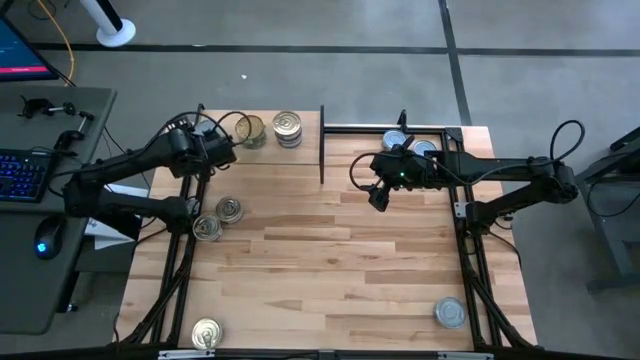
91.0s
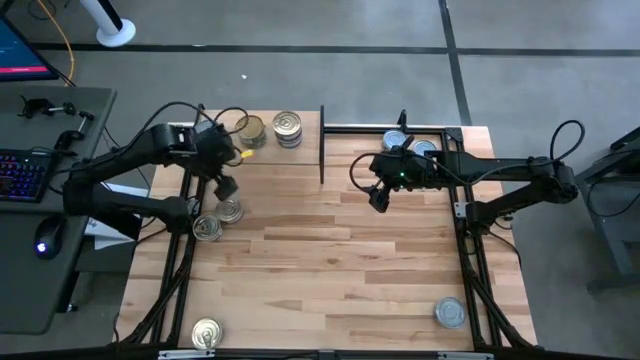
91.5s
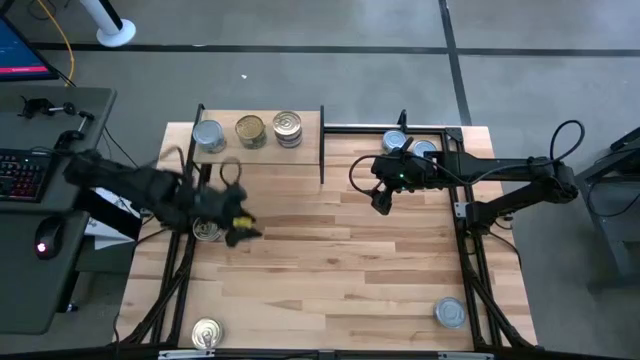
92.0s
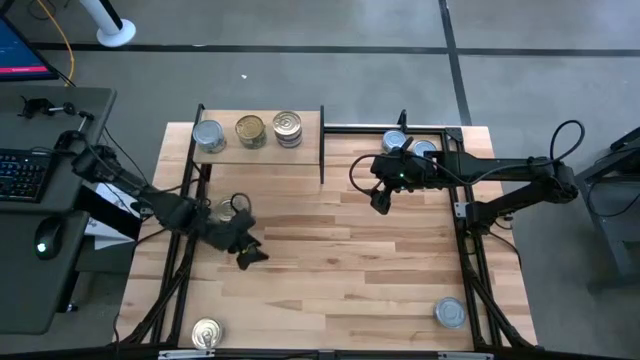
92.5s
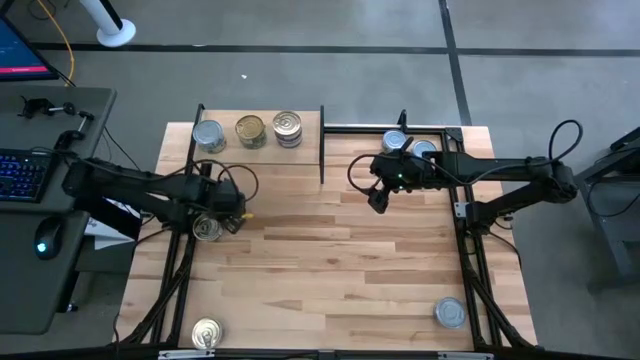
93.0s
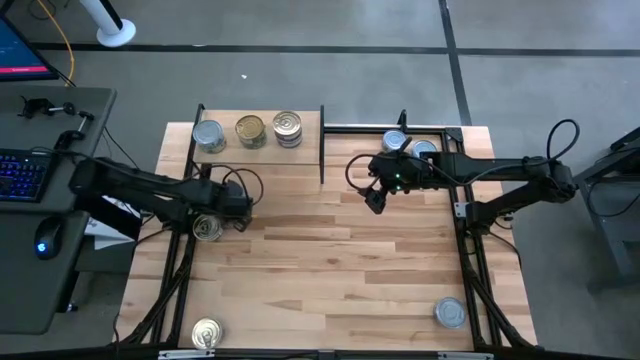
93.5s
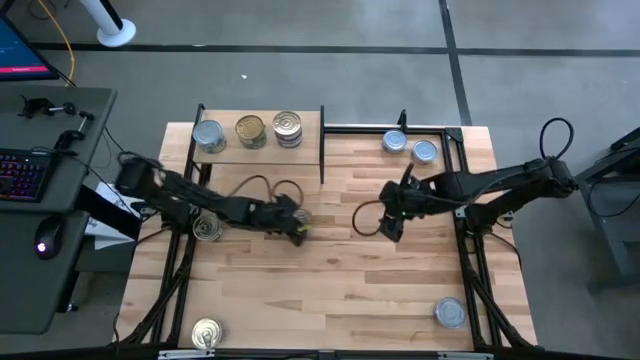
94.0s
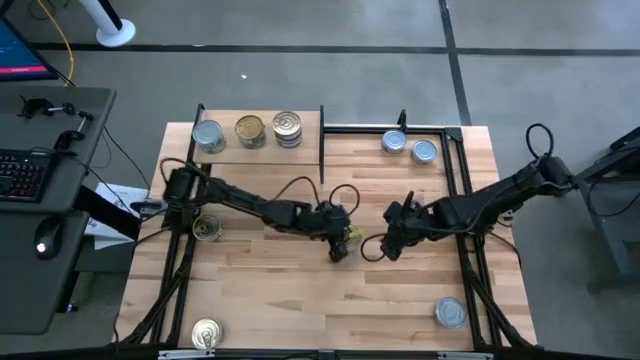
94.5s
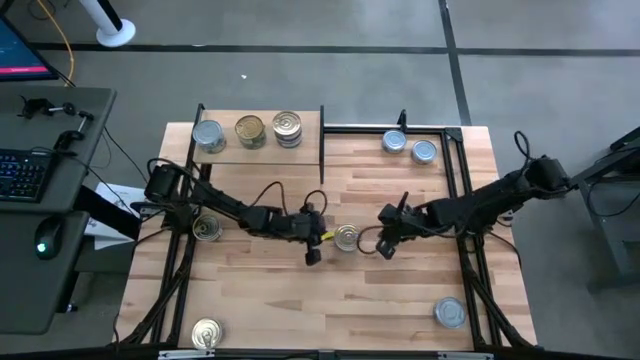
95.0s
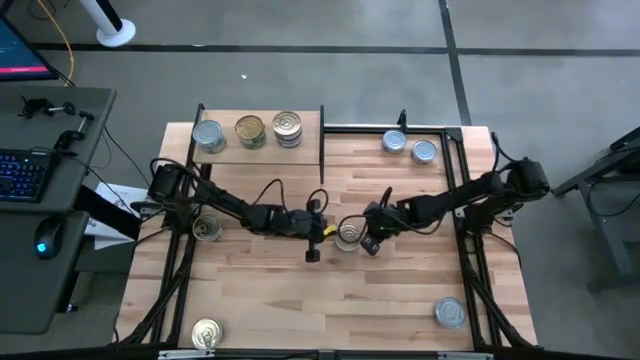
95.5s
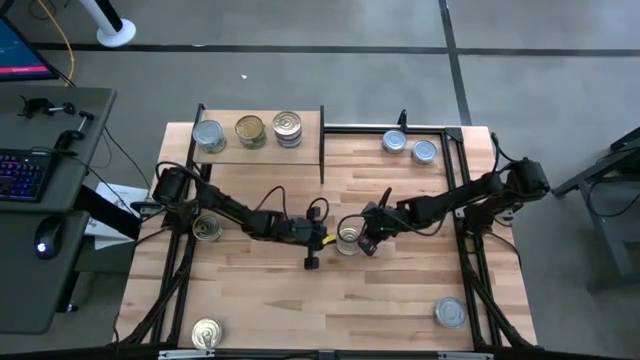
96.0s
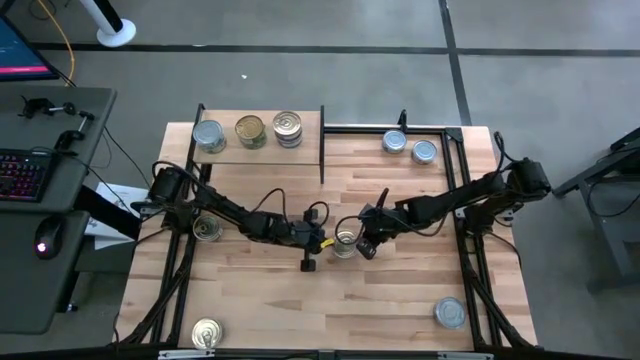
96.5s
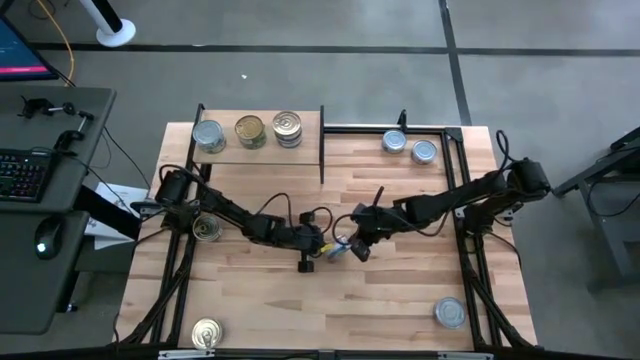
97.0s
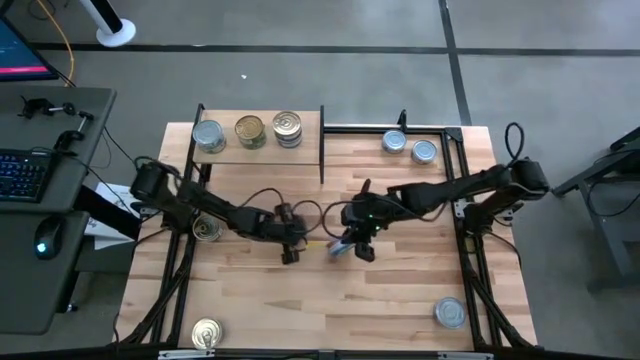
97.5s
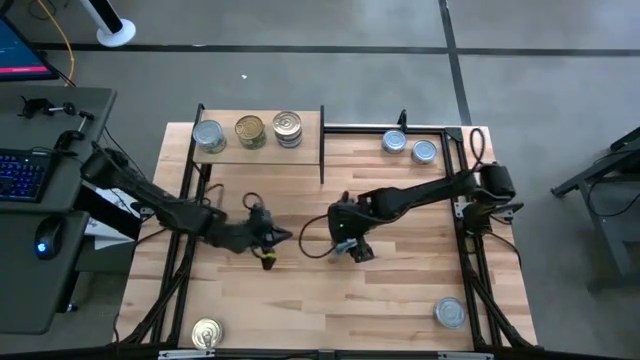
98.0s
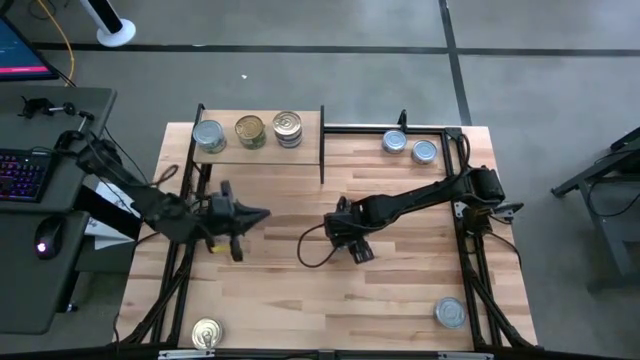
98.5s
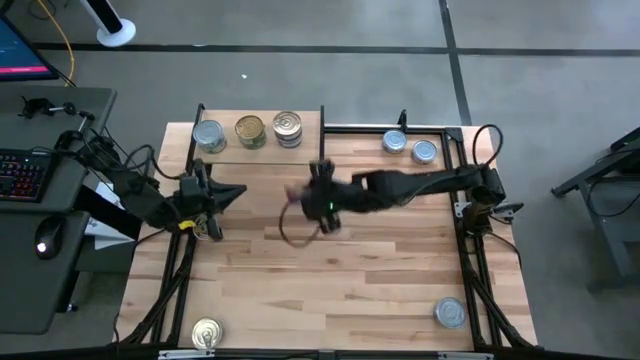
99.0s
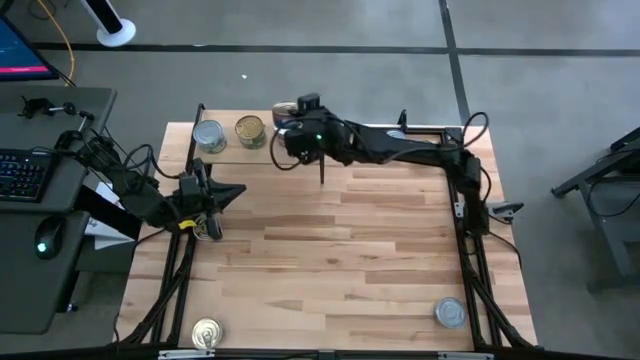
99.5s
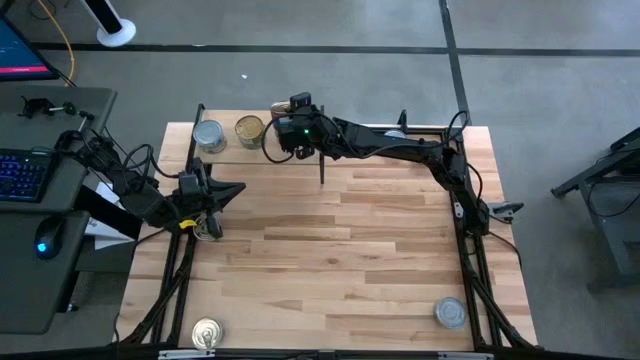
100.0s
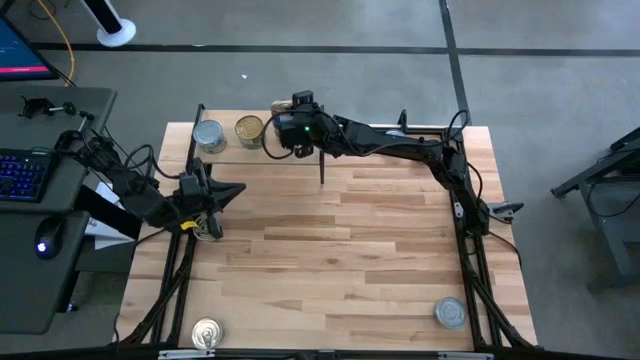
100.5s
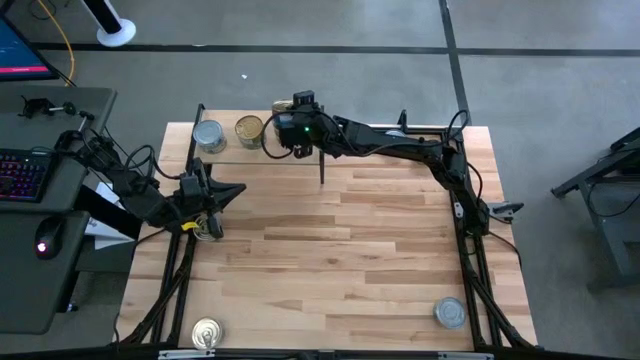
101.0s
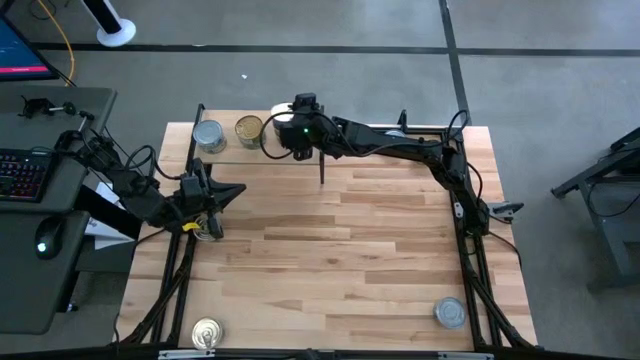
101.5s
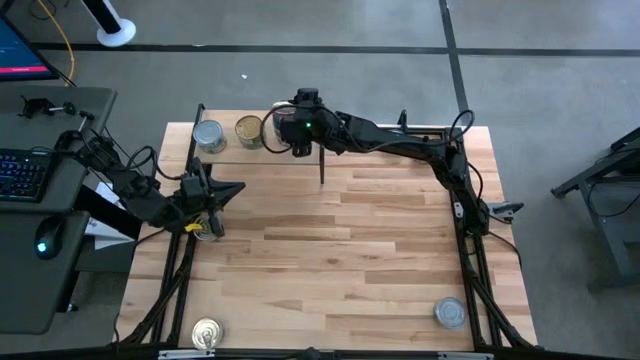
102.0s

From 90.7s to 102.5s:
Task: Stack canned seafood by type on shelf
Stack the blue-pink tuna can on top of the blue-pink tuna cans on the shelf

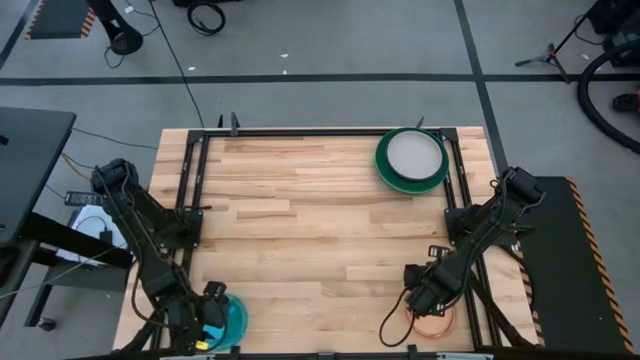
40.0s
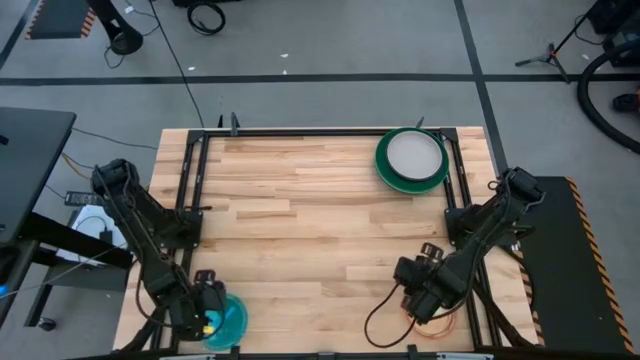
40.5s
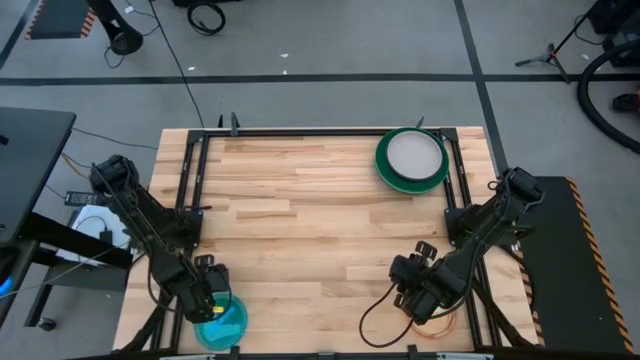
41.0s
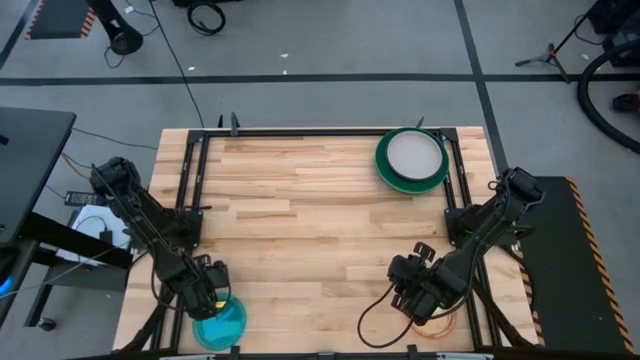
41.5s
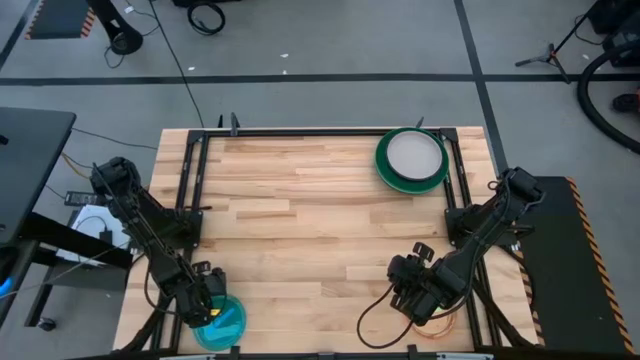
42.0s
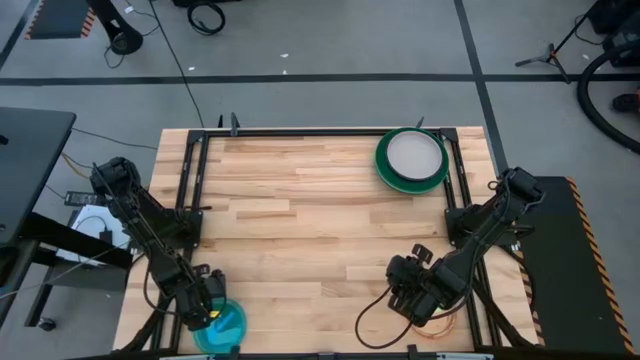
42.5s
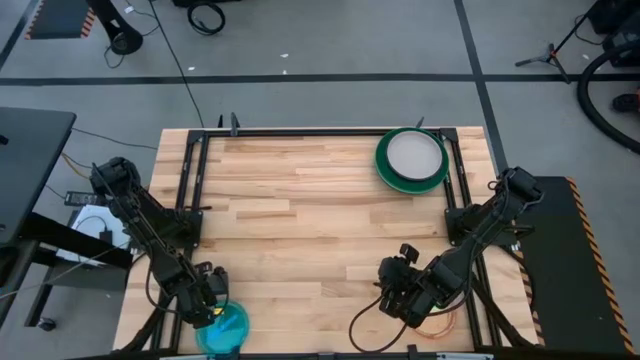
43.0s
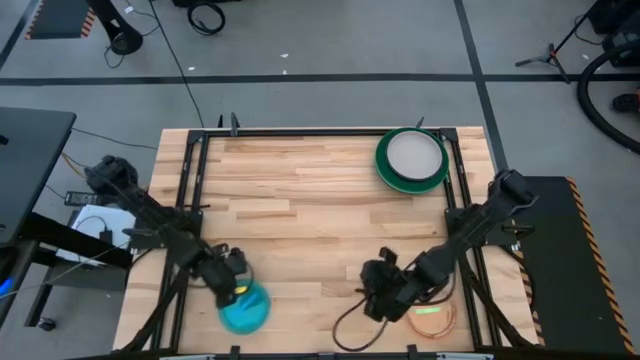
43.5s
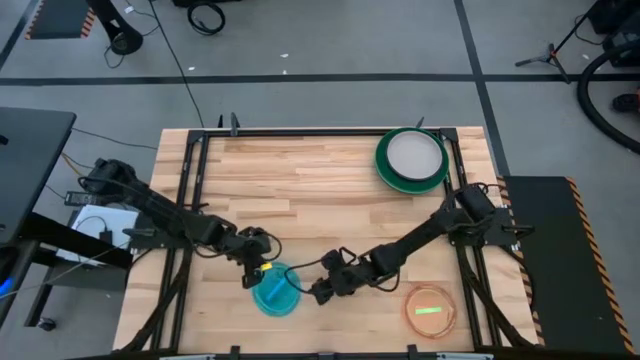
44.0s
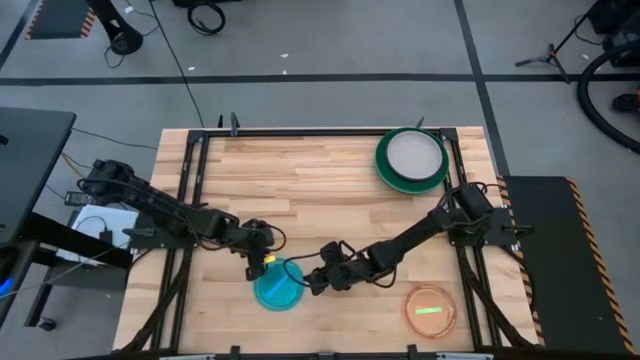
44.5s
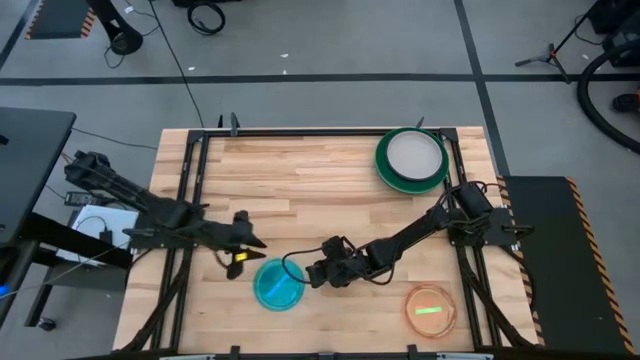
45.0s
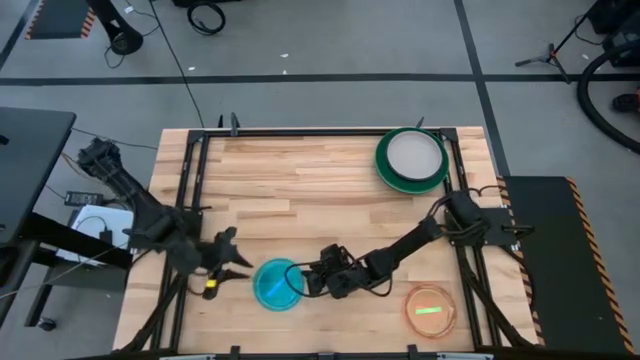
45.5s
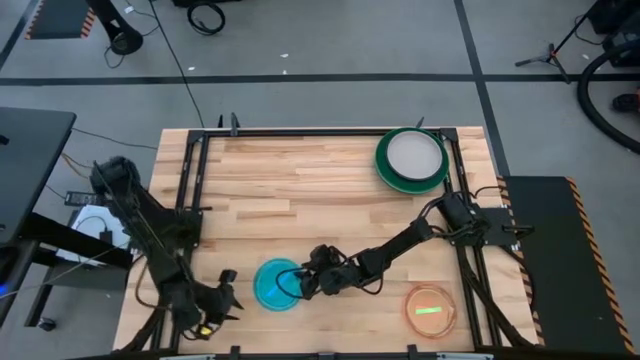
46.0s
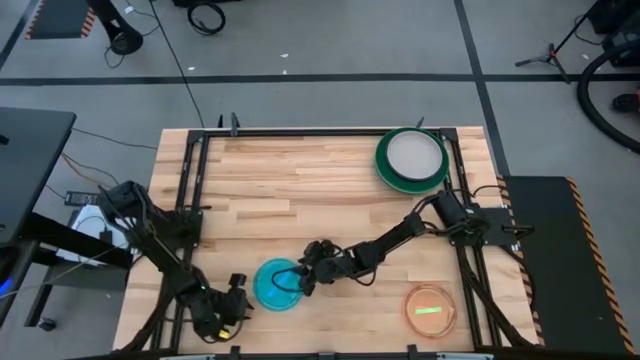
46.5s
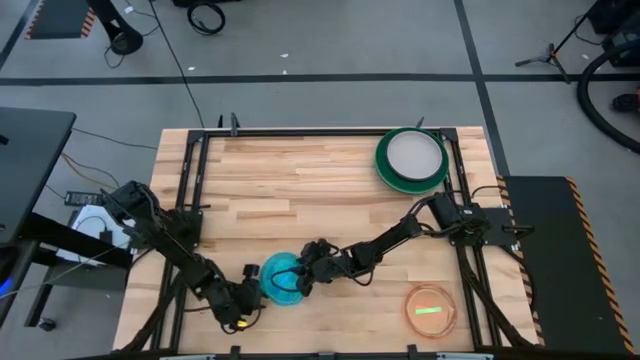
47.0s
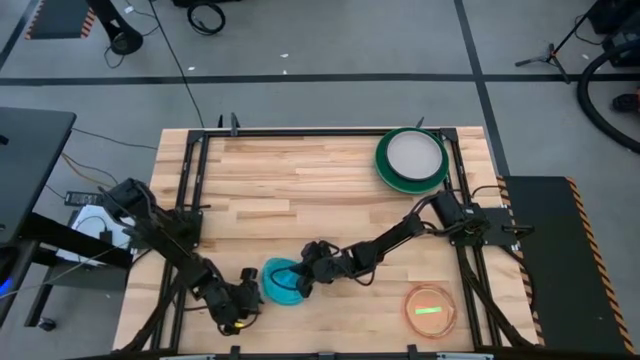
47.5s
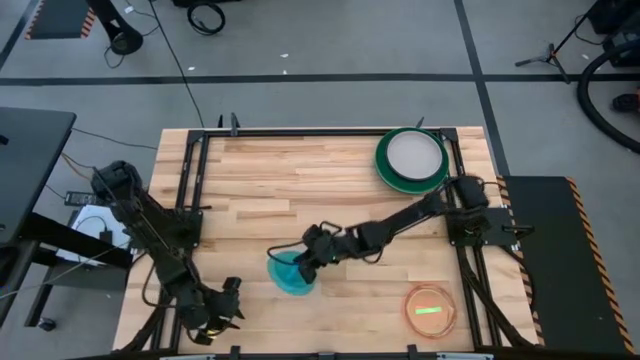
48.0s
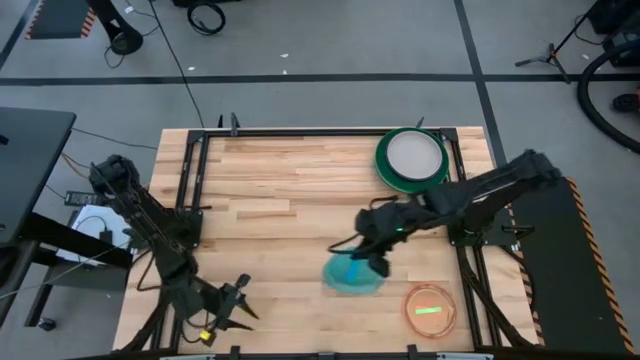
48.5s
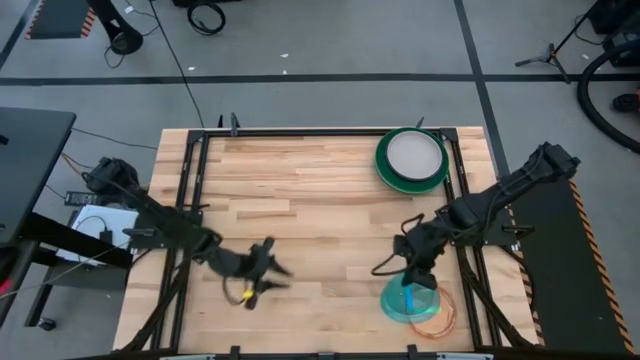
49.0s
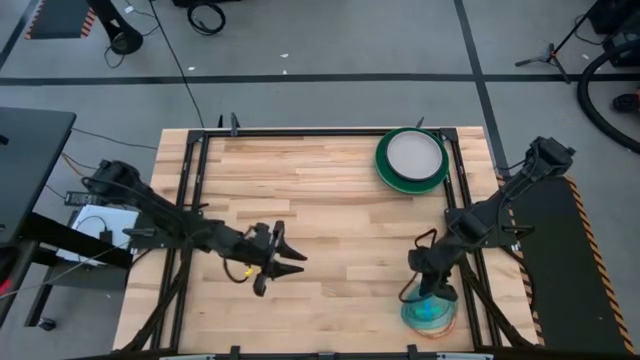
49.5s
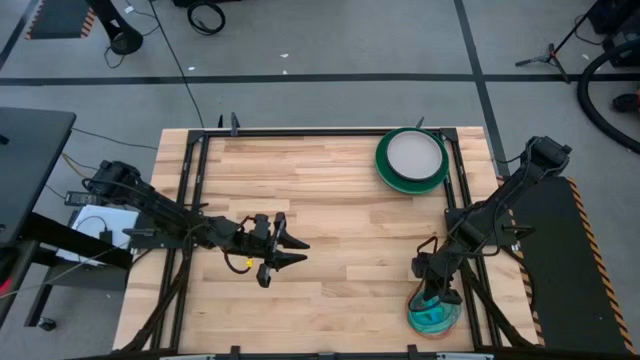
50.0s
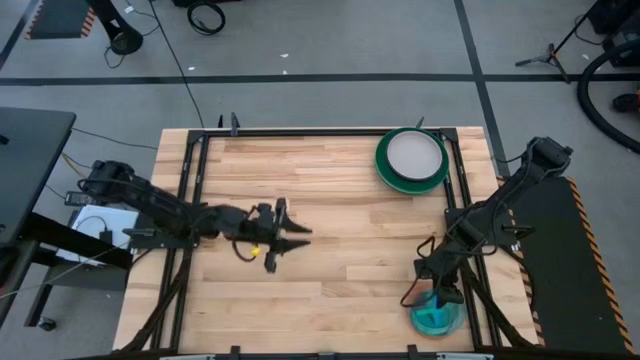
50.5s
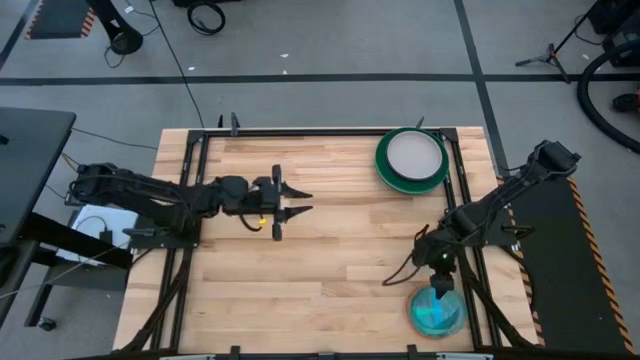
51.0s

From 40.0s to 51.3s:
Task: Stack plastic plates
Stack the blue plate on top of the light green plate
